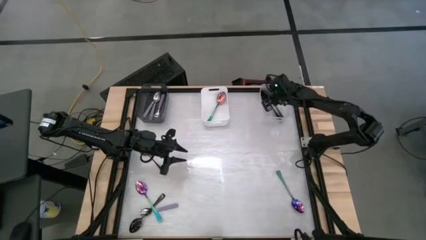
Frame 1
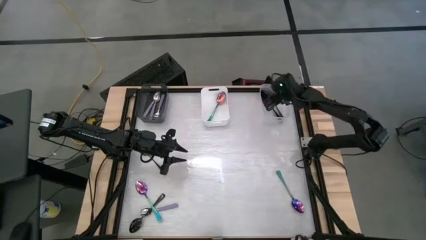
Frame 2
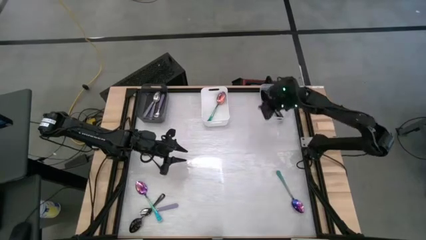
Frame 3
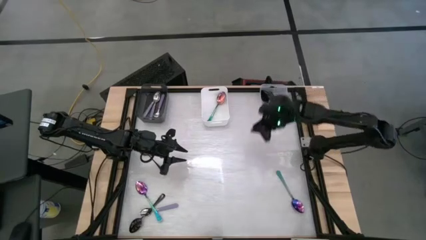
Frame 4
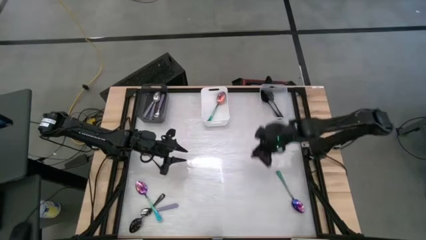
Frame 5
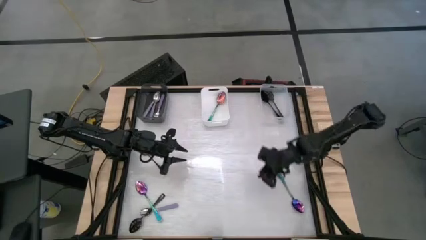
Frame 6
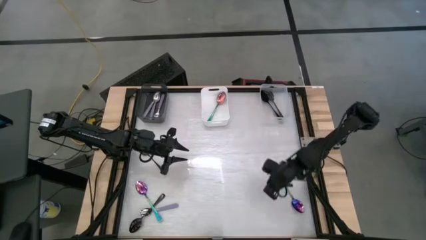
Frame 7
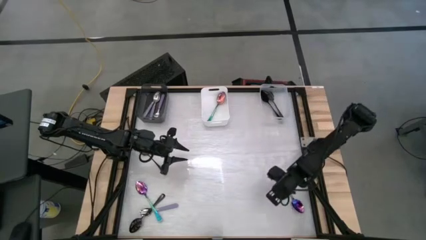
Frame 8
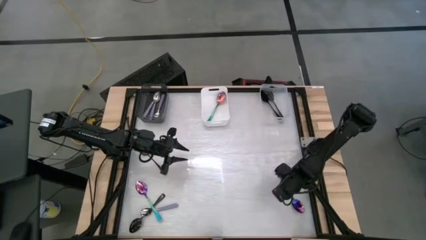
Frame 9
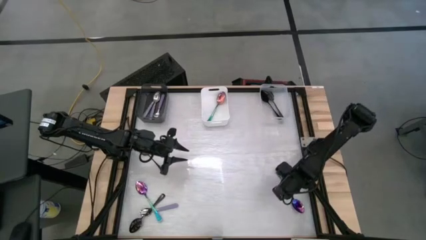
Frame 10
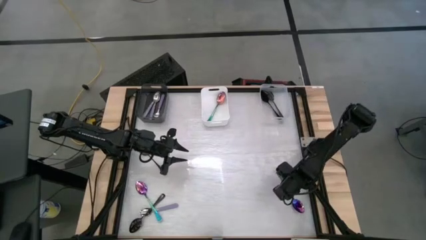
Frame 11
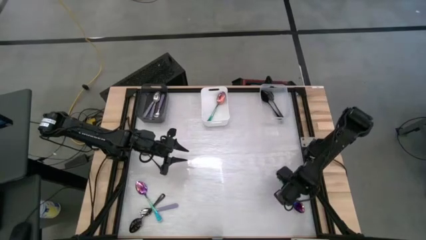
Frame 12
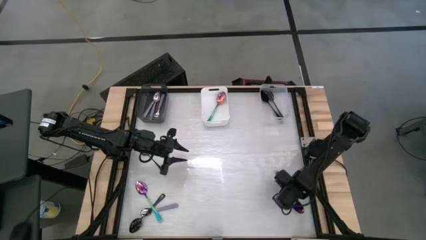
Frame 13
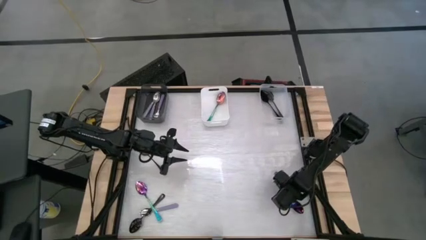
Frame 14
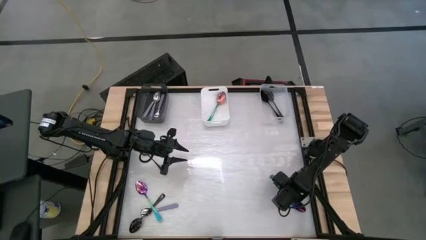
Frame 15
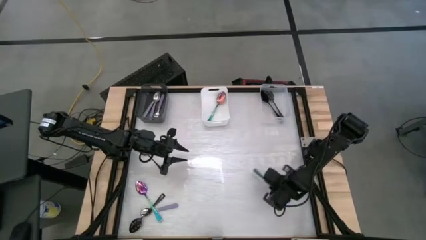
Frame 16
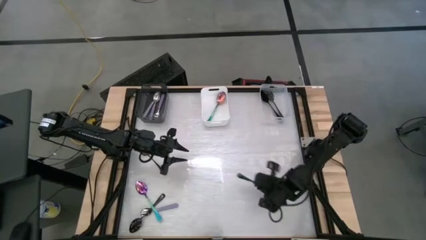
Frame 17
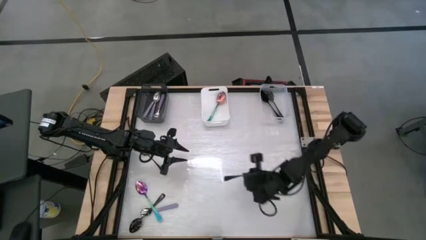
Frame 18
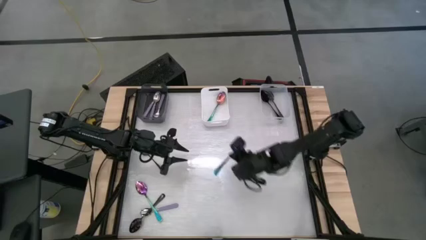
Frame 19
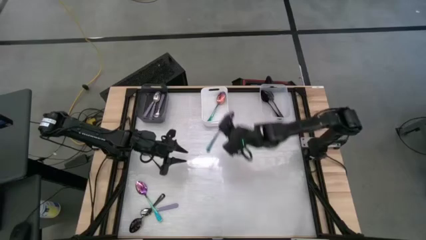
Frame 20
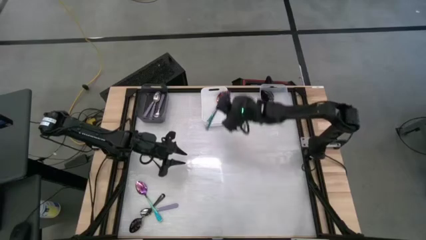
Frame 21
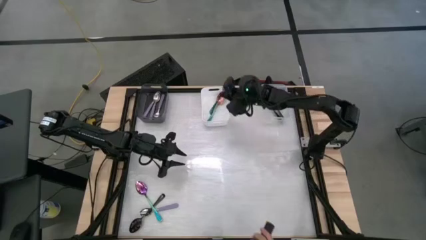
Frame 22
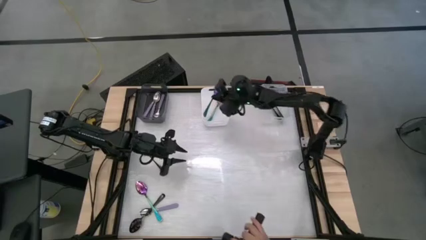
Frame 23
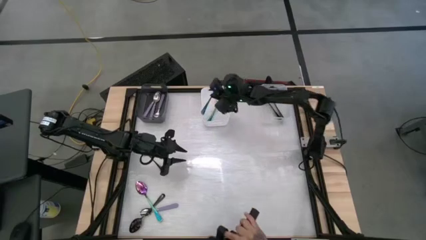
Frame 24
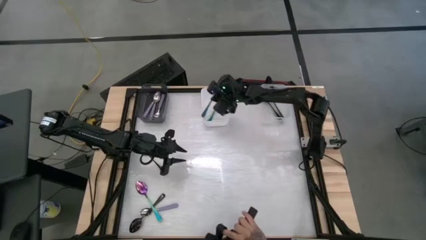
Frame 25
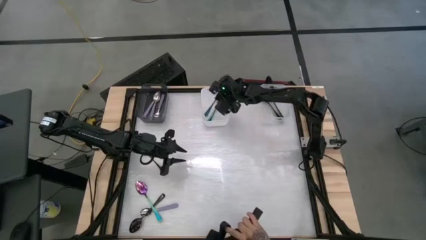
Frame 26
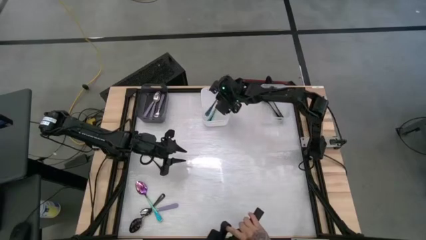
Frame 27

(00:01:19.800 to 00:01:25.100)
Task: Sort silverware by color (type)
Put the blue spoon into the white bin

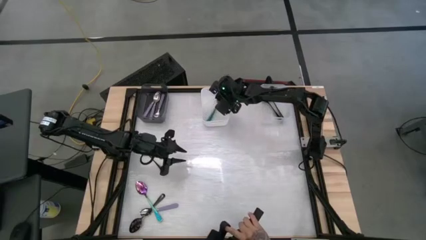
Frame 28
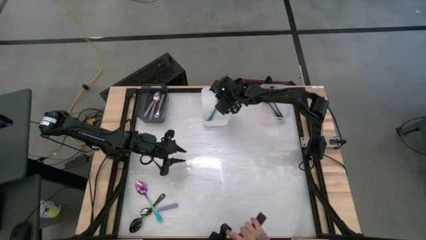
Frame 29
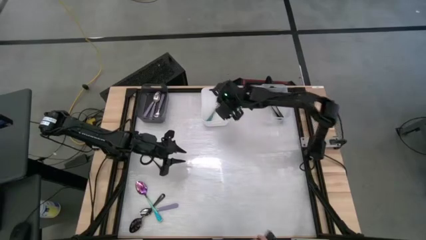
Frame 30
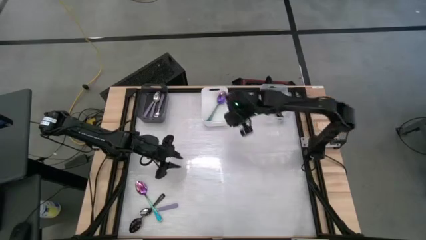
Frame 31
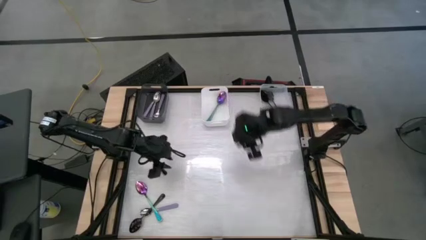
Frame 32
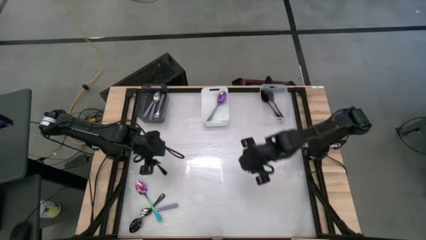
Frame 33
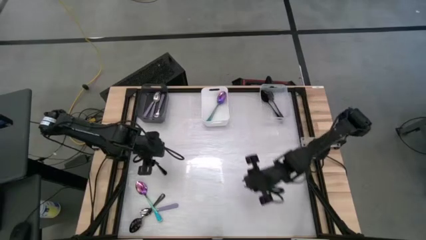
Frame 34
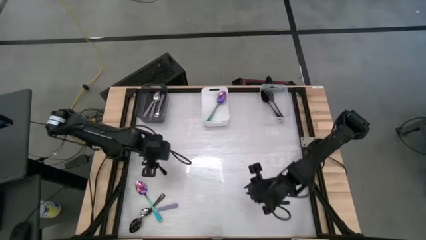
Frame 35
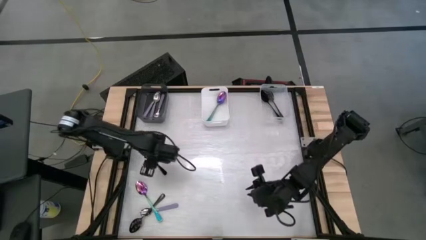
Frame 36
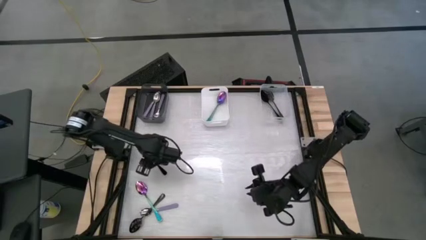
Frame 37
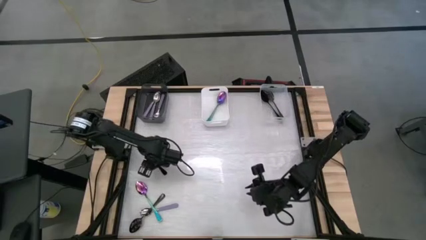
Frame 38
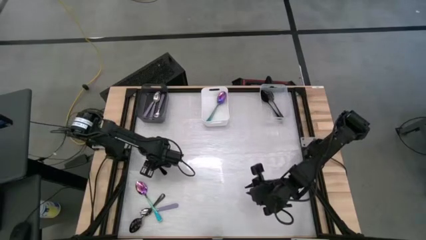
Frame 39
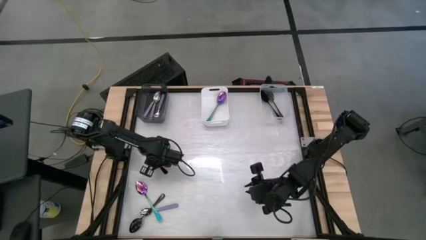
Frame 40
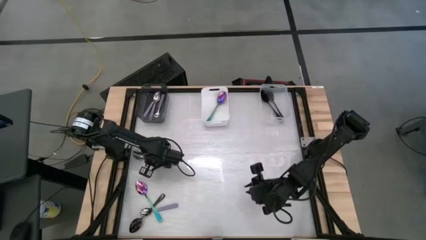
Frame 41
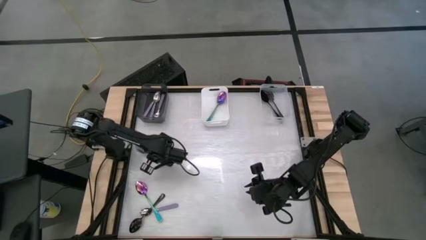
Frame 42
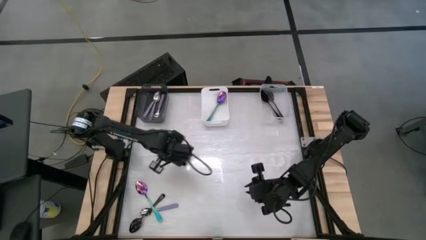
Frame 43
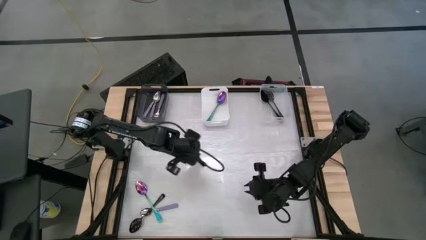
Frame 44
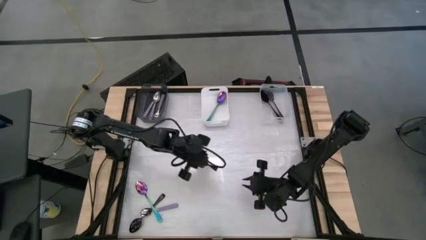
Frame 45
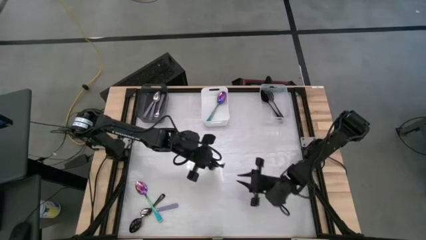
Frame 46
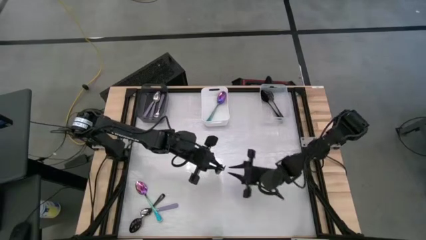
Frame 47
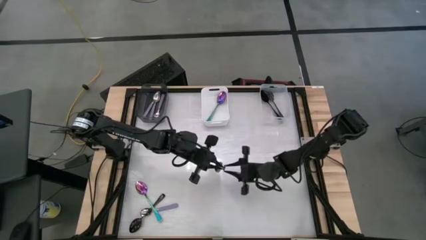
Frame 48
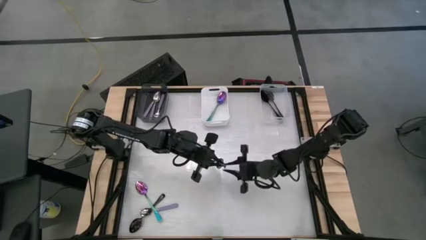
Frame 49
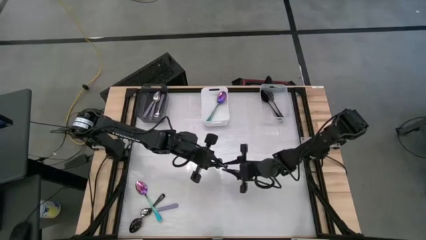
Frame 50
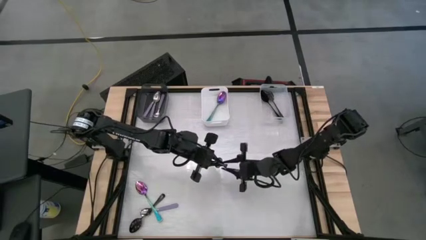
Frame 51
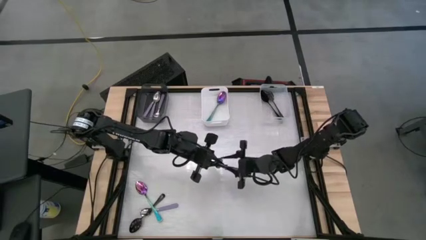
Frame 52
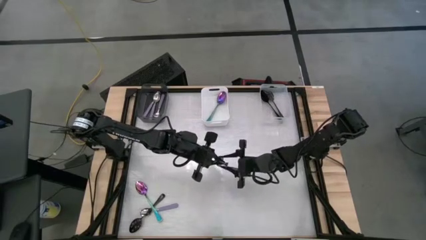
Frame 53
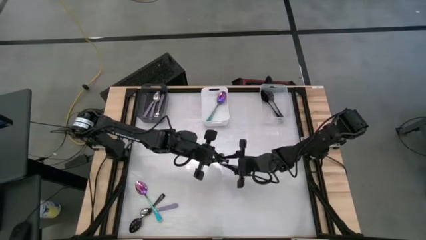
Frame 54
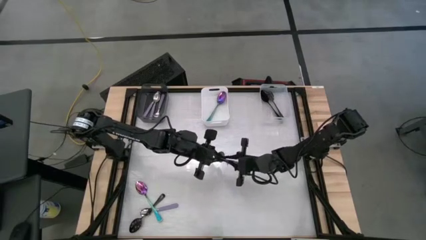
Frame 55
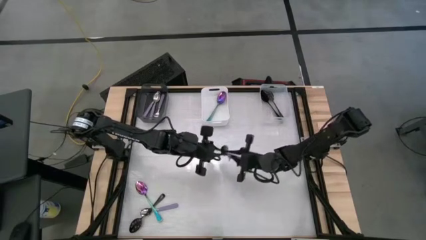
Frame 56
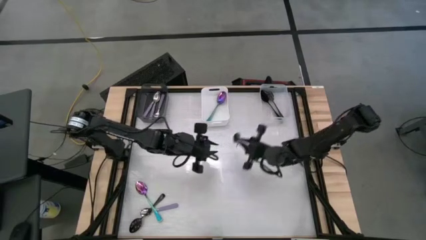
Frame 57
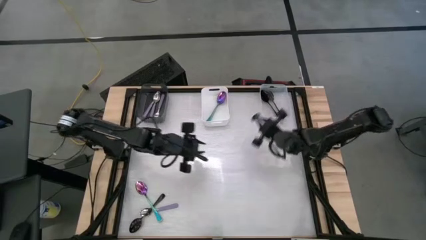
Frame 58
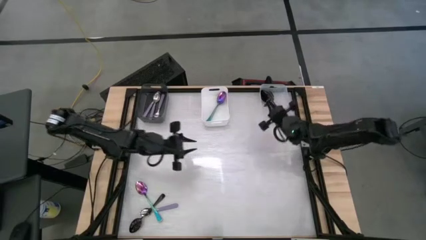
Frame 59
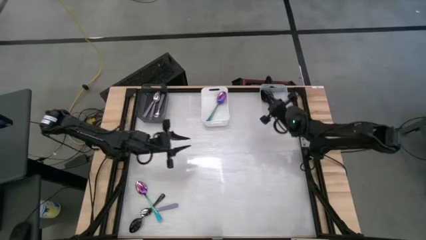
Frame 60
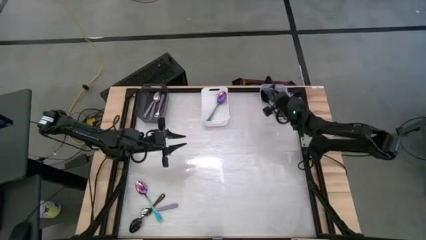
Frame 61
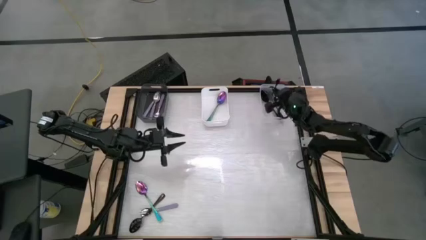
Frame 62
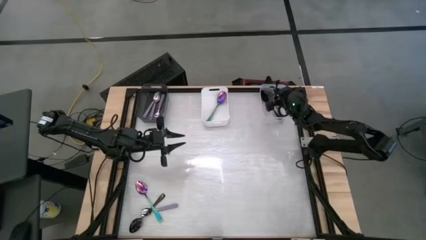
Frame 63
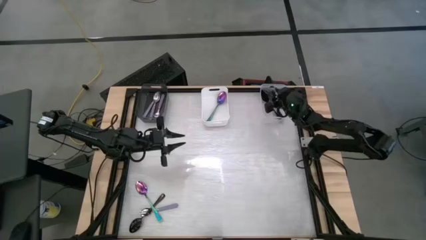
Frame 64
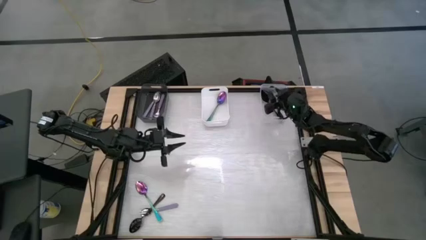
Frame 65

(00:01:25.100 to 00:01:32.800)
Put the black spoon into the transparent bin

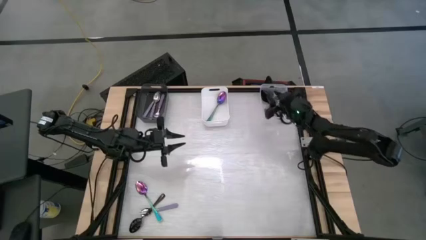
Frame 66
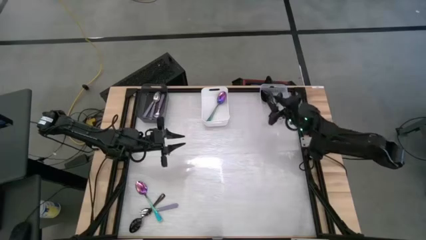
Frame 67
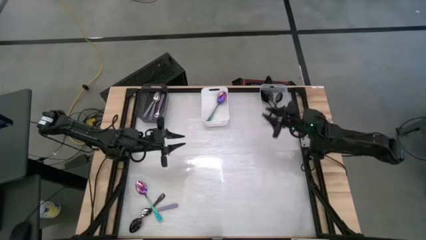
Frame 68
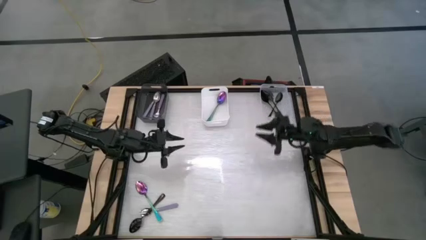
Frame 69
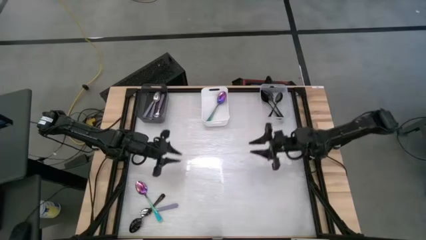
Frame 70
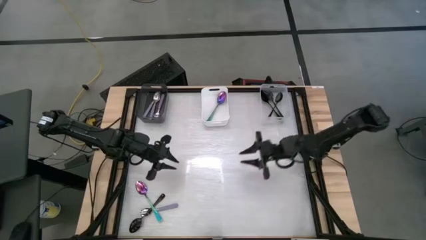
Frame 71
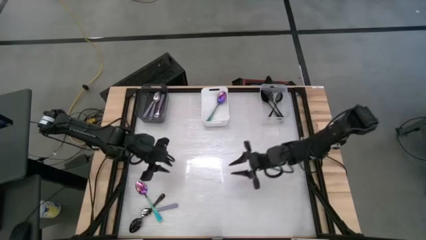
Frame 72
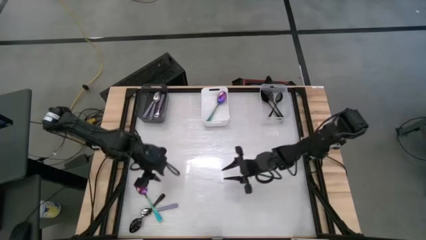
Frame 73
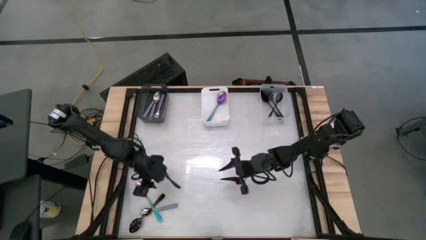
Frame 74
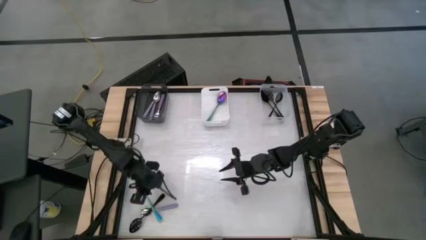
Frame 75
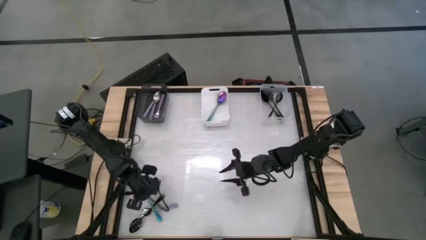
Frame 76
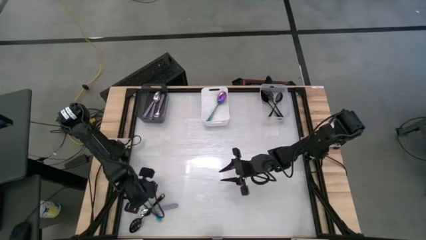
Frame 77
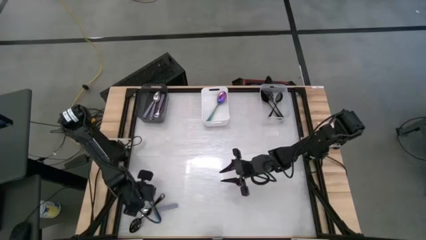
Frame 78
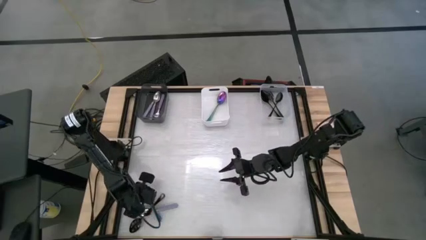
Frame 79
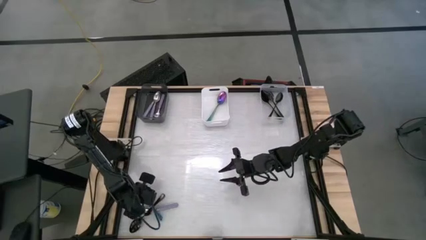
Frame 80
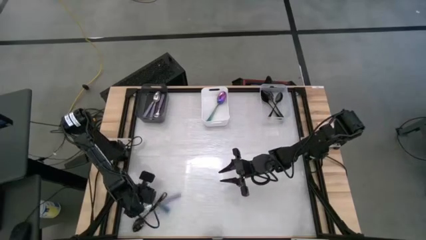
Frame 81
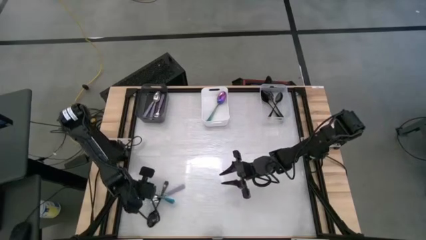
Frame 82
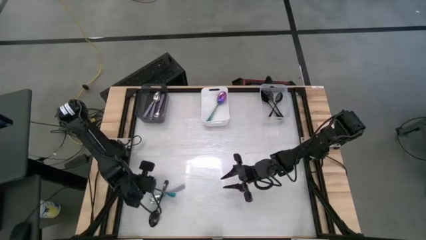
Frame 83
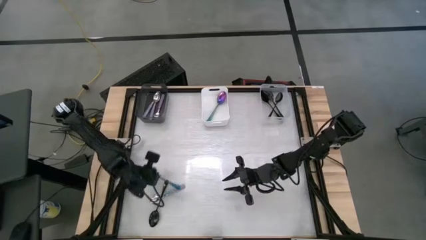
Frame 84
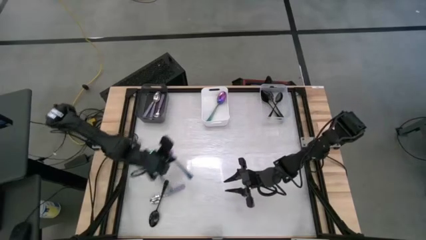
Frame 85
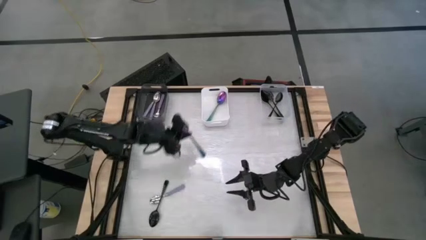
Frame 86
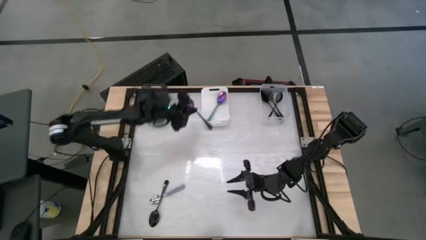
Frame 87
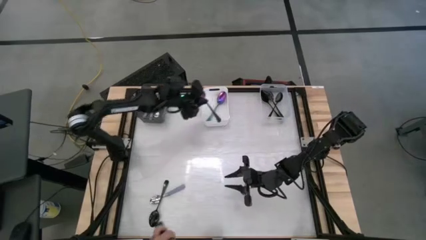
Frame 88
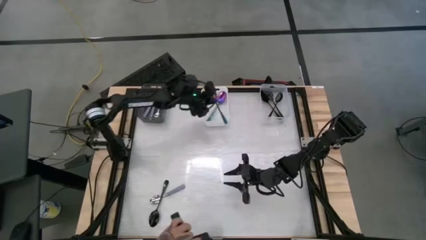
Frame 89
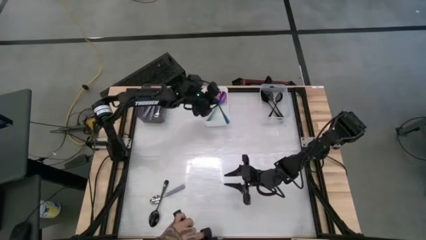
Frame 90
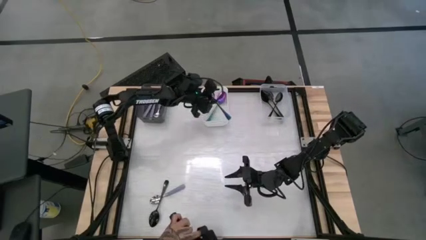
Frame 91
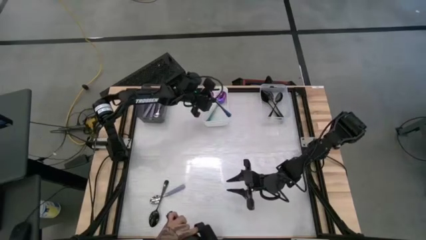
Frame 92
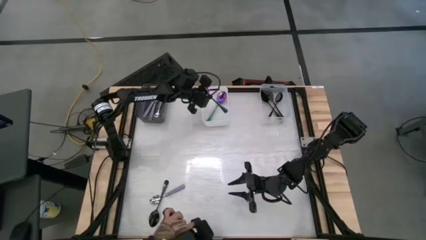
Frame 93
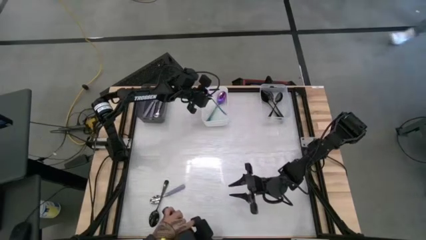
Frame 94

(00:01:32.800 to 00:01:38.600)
Put the blue spoon into the white bin
